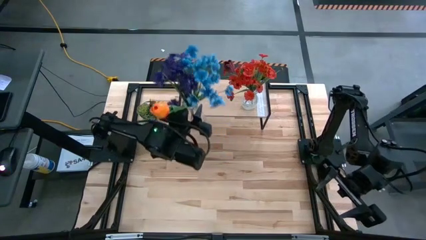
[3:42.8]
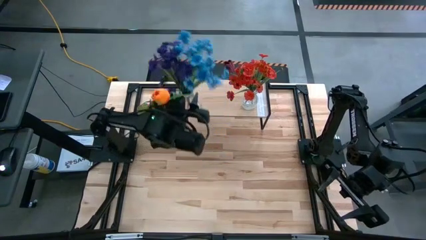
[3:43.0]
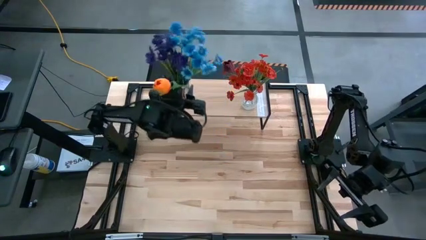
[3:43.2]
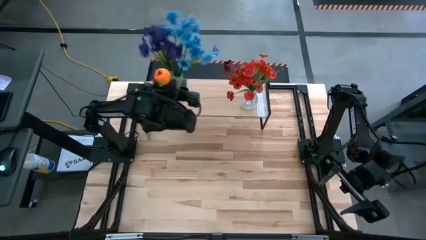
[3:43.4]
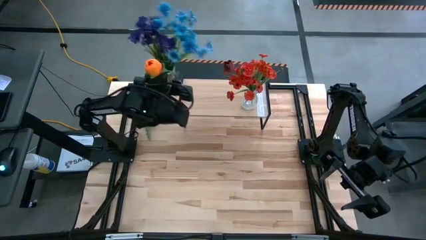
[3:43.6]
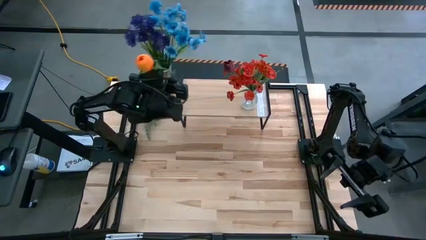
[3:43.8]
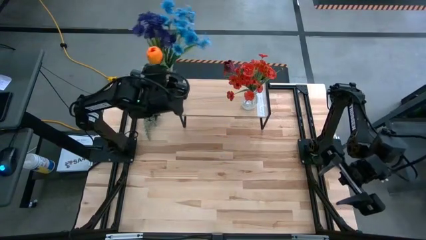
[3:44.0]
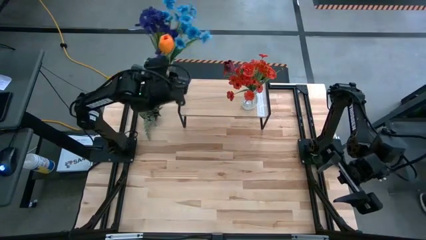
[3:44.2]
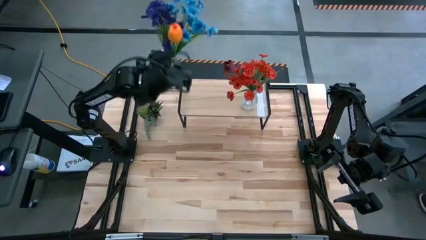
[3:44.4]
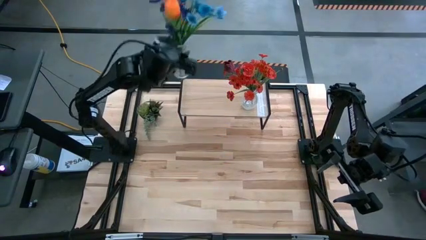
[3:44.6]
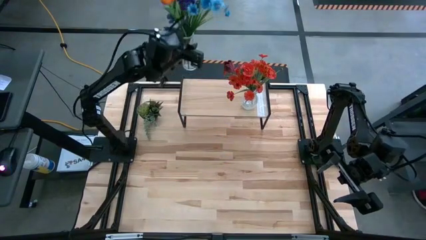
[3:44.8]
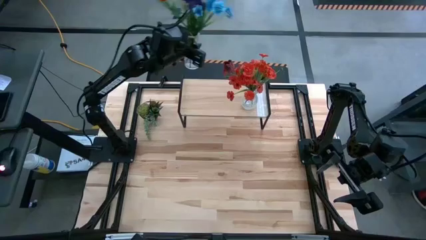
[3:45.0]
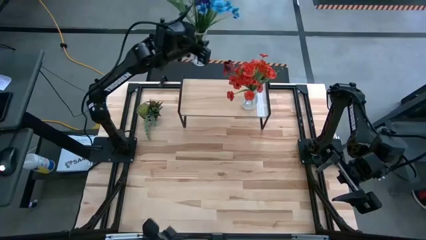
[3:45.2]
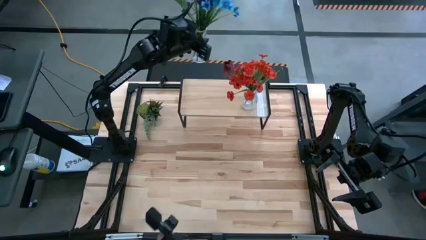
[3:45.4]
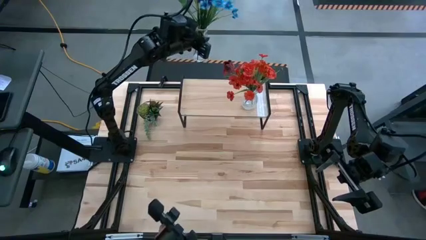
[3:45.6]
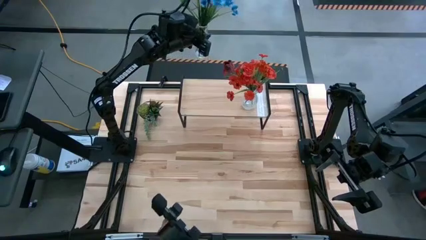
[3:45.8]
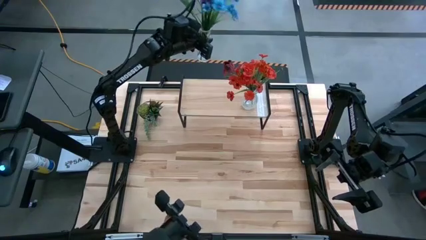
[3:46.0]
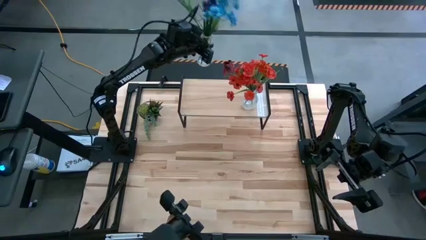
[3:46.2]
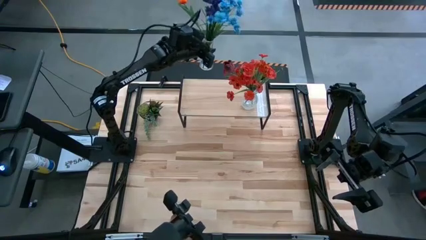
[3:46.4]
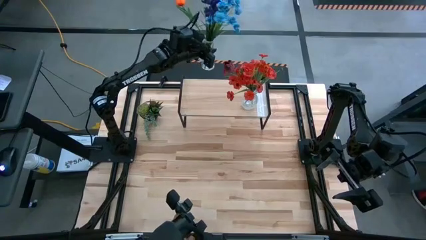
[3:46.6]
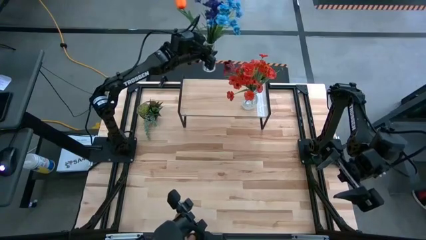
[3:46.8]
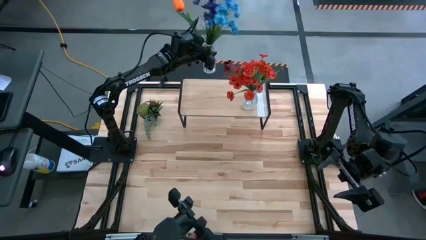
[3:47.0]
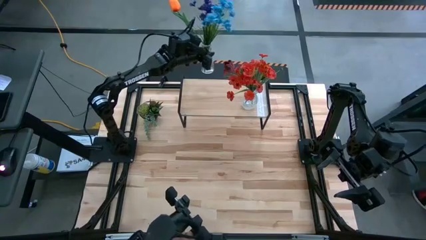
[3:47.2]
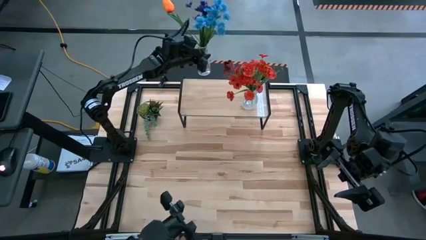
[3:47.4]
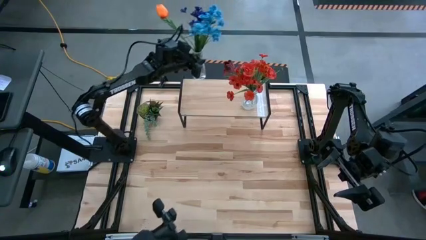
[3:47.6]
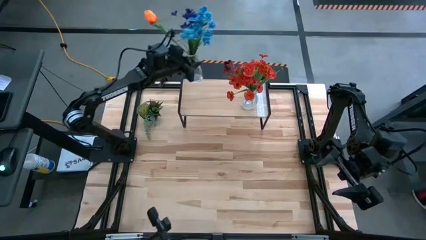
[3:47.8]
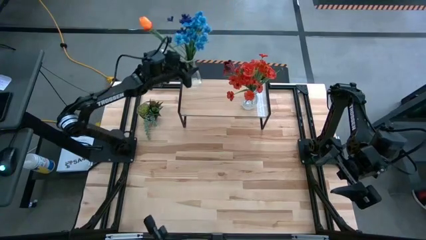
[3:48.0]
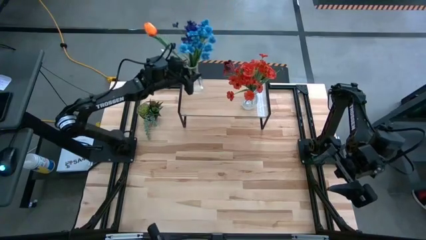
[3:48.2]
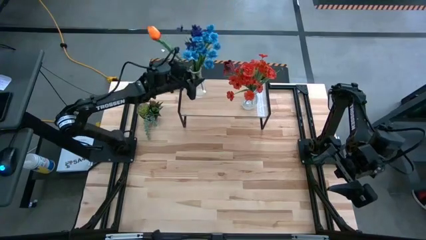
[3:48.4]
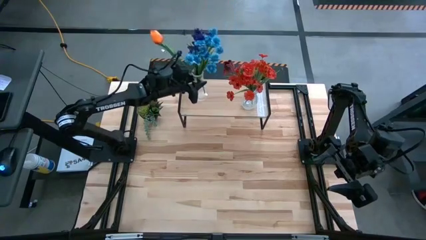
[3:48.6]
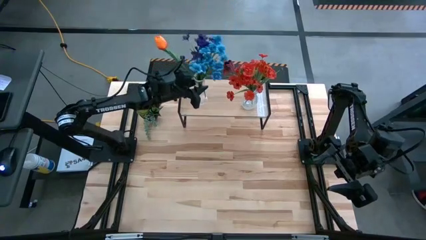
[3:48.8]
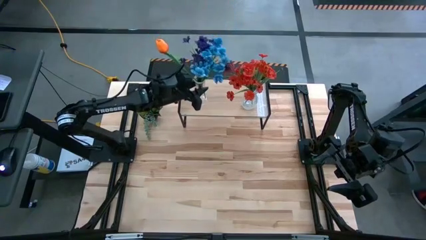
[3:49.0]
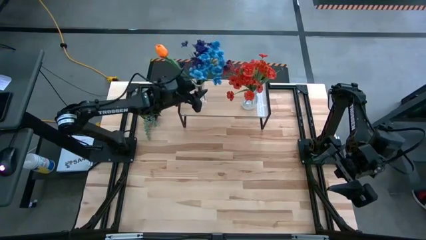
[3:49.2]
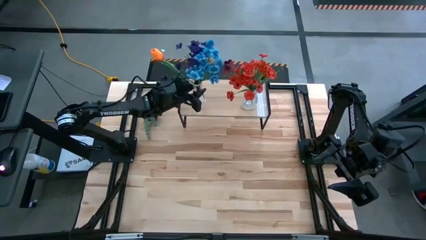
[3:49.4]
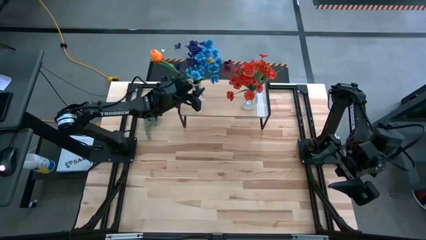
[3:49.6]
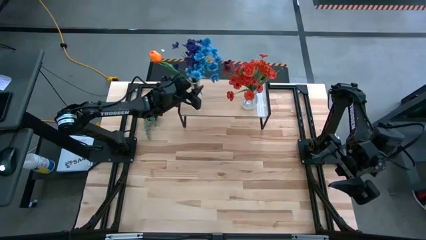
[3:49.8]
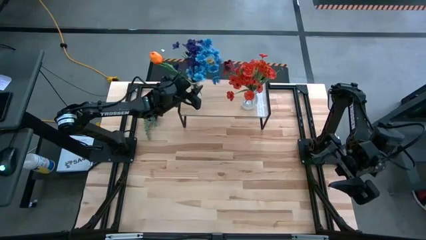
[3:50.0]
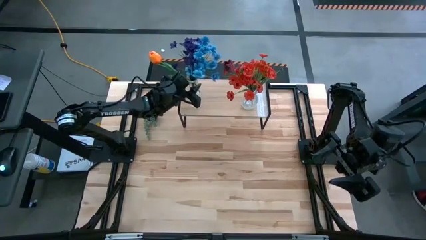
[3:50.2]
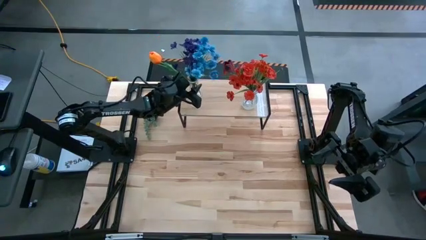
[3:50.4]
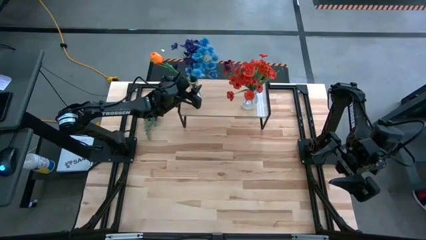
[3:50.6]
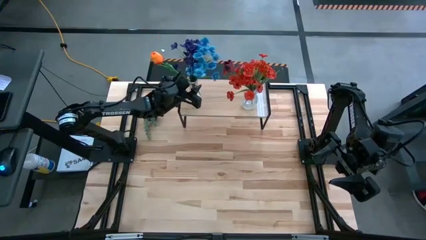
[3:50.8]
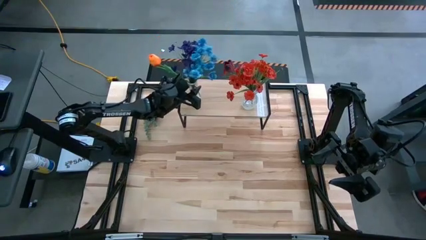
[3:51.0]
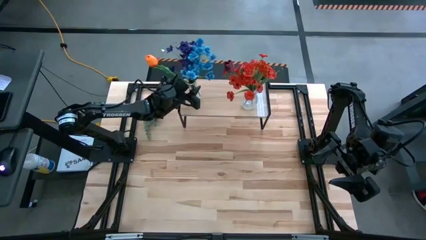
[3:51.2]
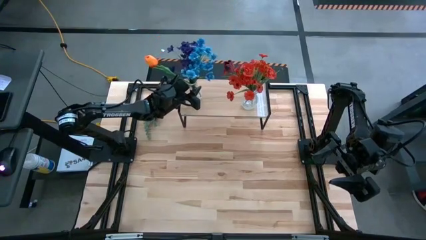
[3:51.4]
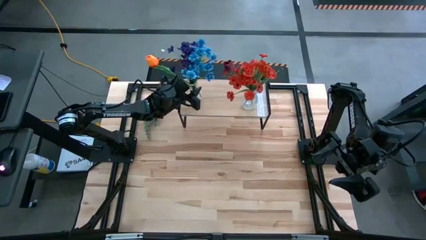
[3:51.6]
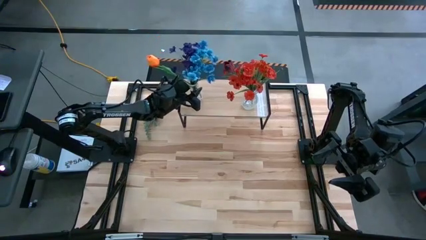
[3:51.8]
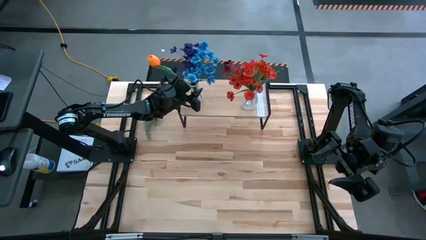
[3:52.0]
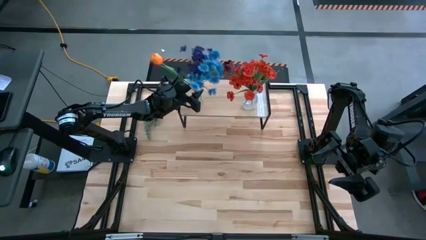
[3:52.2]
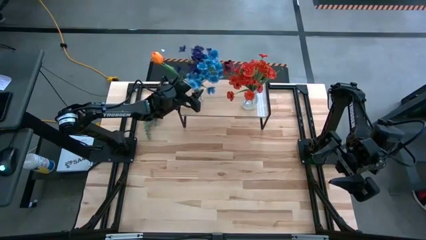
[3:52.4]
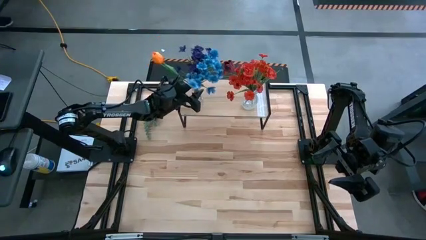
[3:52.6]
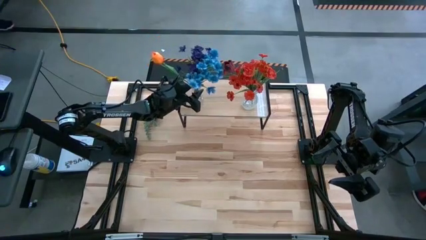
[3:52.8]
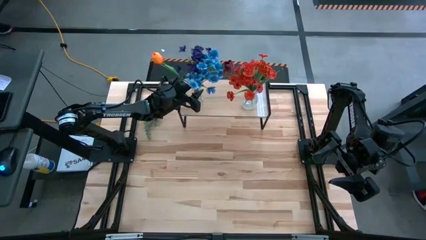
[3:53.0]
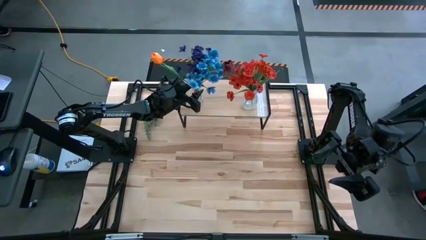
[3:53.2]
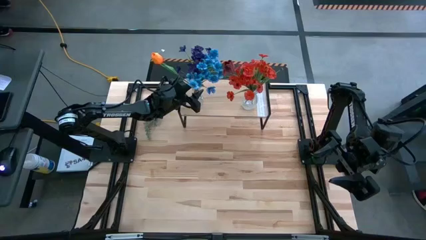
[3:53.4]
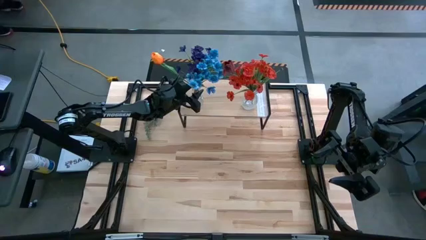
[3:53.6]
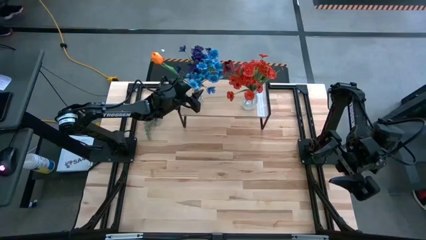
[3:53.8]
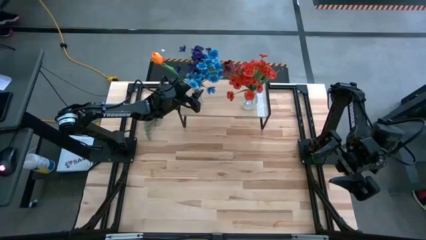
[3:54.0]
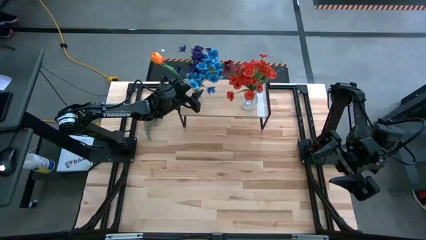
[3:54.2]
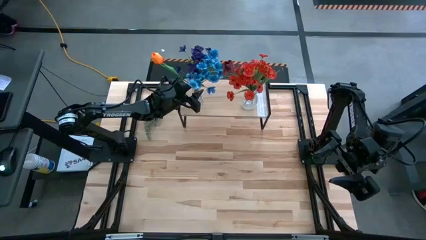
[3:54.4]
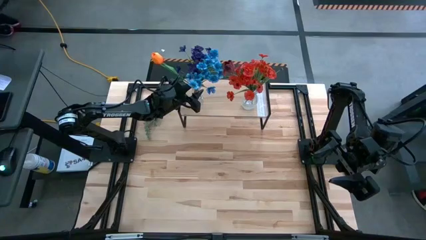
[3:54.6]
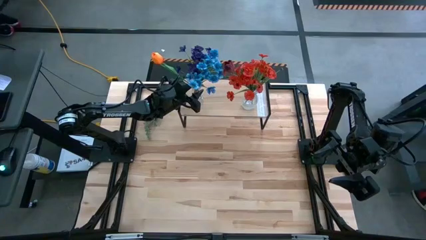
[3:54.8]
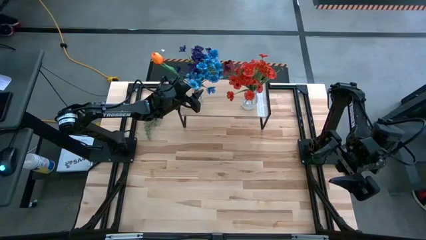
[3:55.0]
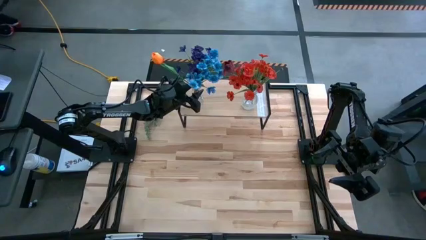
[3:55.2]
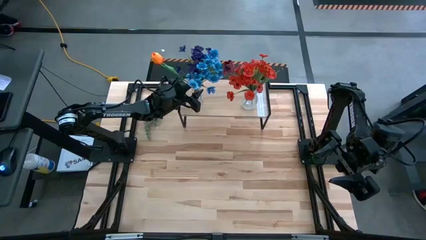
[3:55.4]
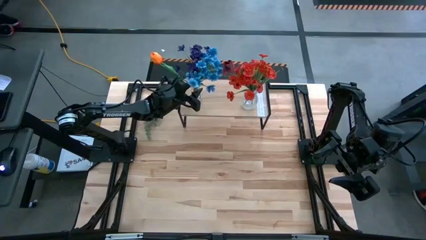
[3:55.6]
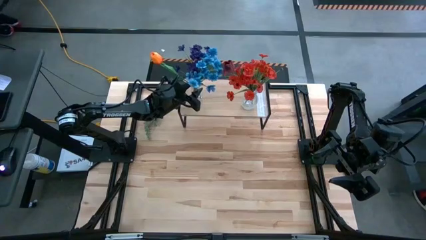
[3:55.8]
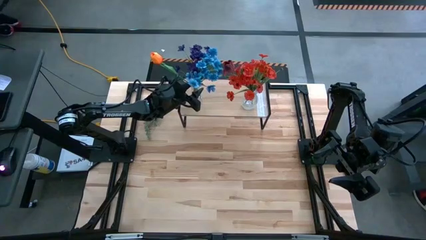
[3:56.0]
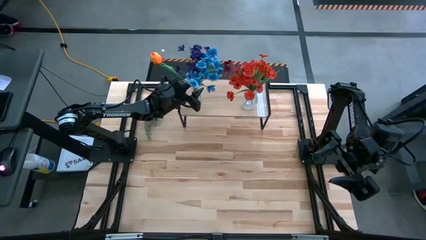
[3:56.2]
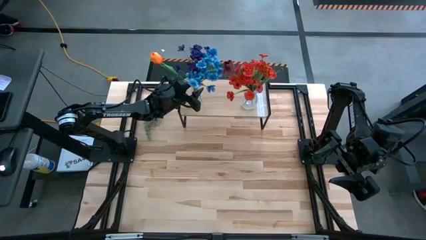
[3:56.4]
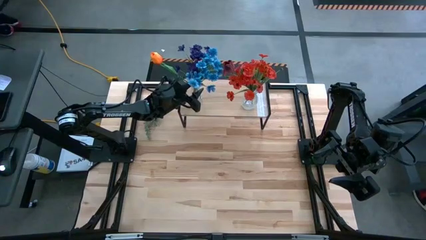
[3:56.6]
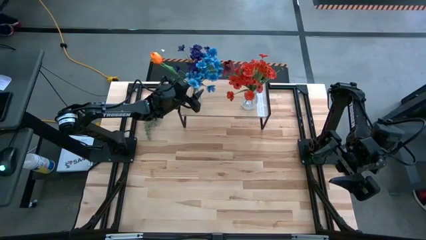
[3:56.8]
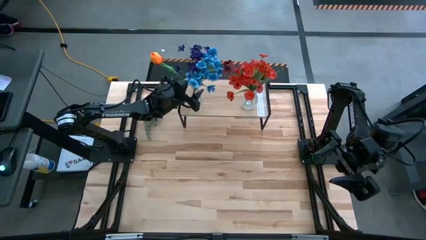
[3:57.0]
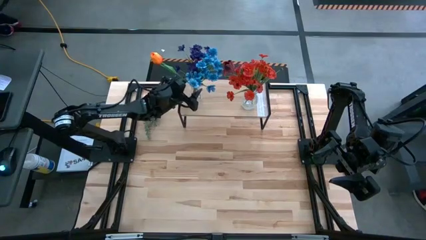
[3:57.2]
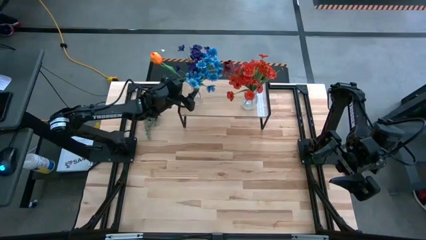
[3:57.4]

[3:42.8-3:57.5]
Task: Pick and place flowers into a vace then onto a shelf
Put the transparent crystal vase with flowers on the shelf
